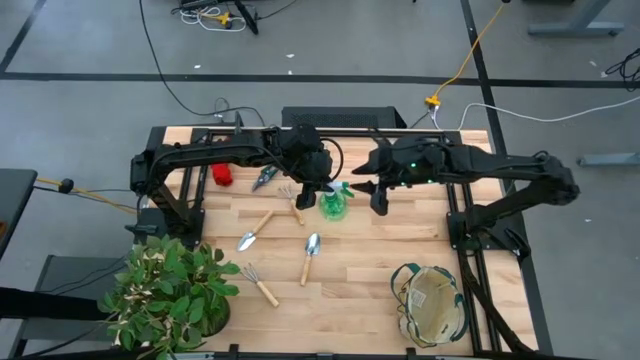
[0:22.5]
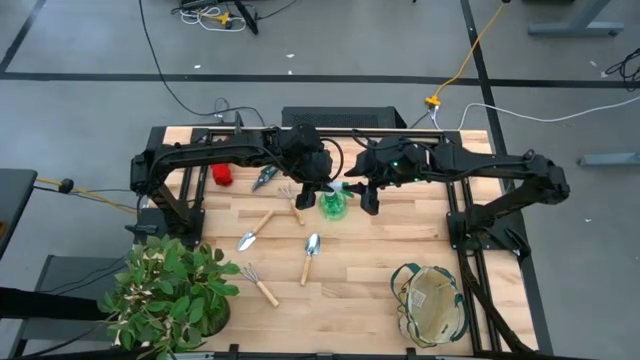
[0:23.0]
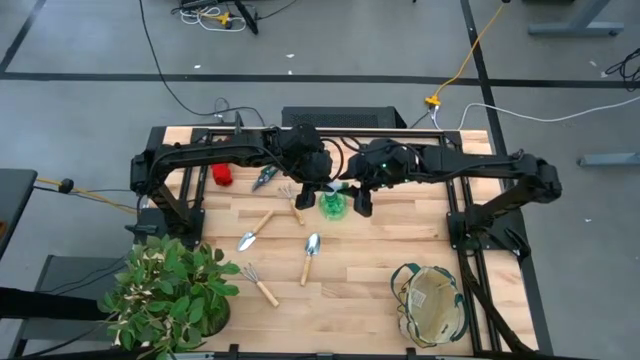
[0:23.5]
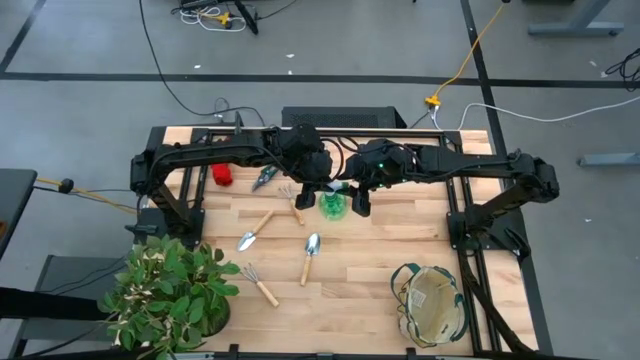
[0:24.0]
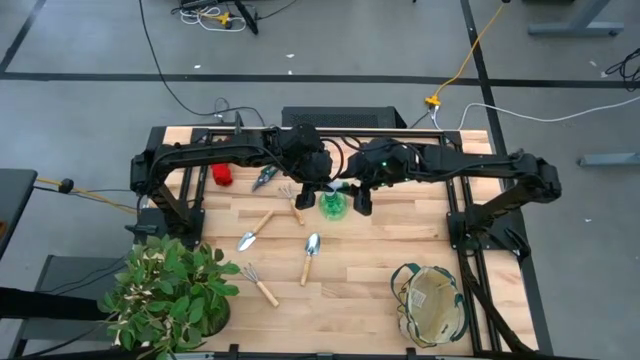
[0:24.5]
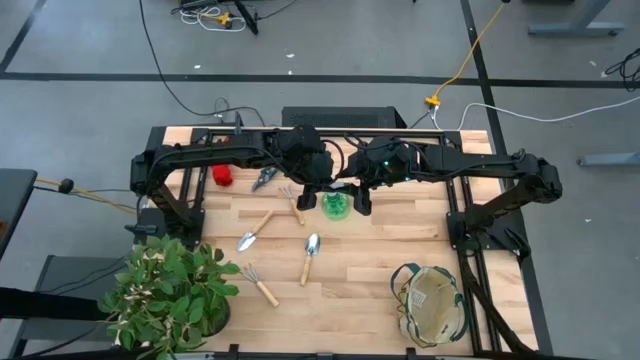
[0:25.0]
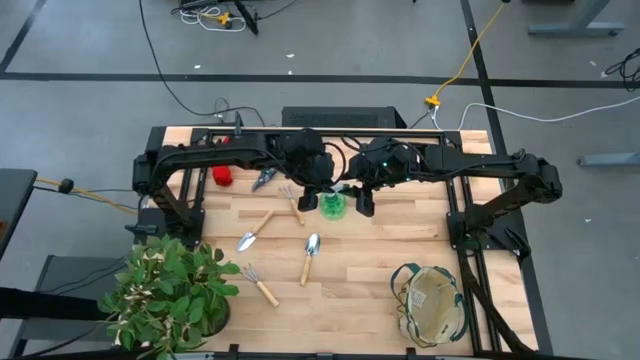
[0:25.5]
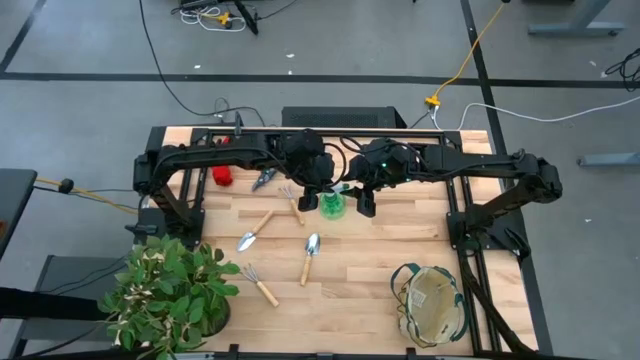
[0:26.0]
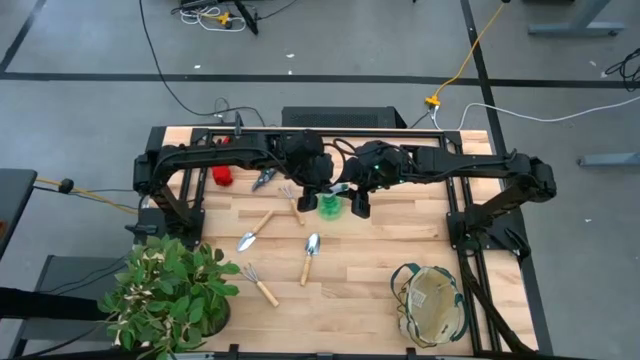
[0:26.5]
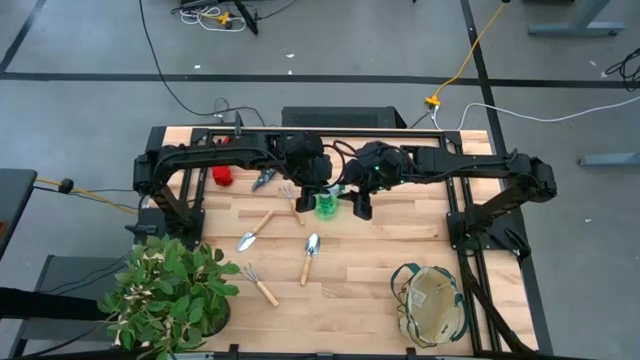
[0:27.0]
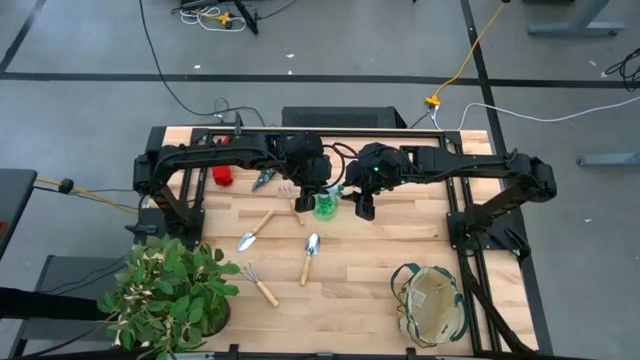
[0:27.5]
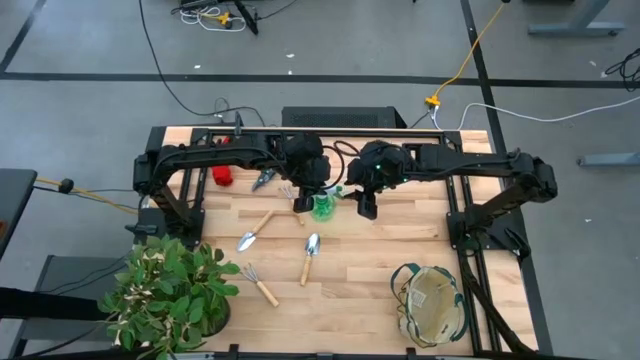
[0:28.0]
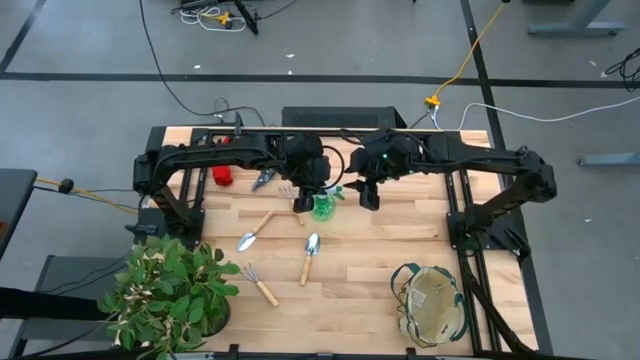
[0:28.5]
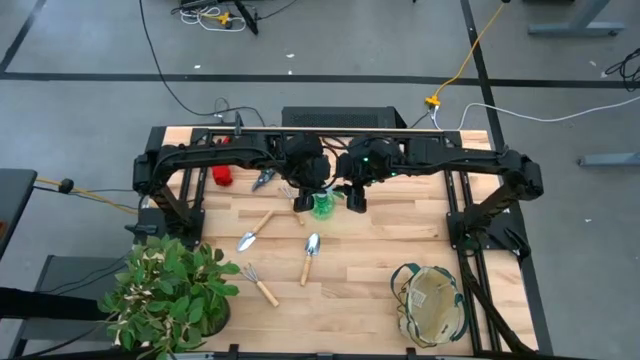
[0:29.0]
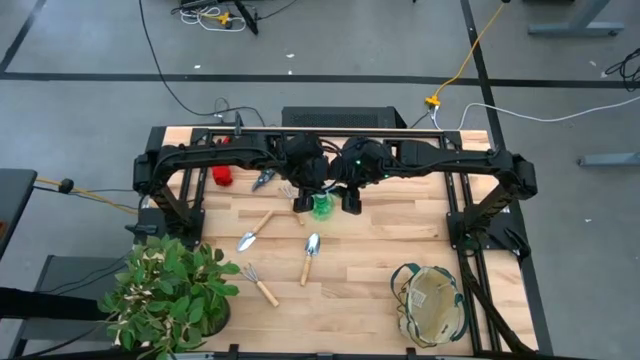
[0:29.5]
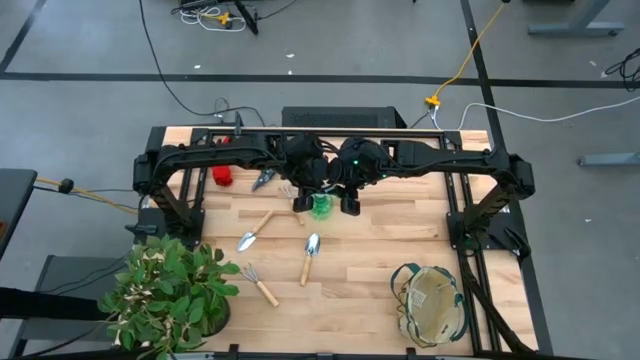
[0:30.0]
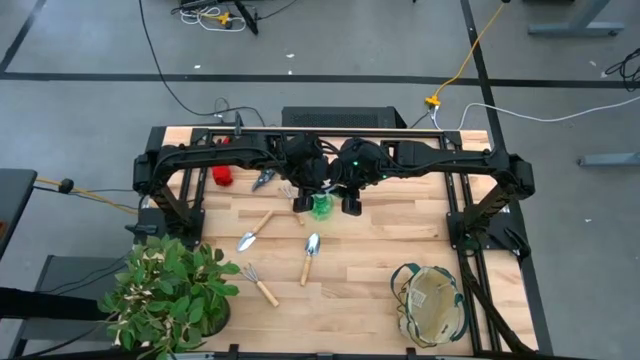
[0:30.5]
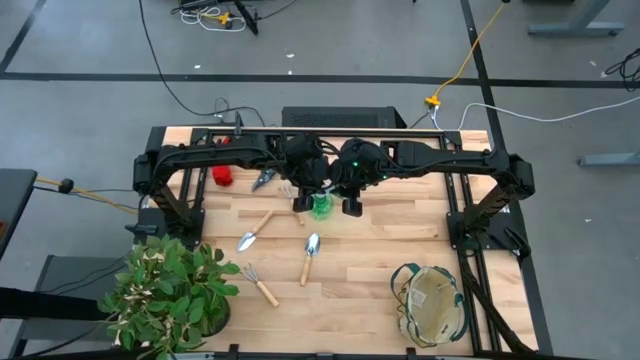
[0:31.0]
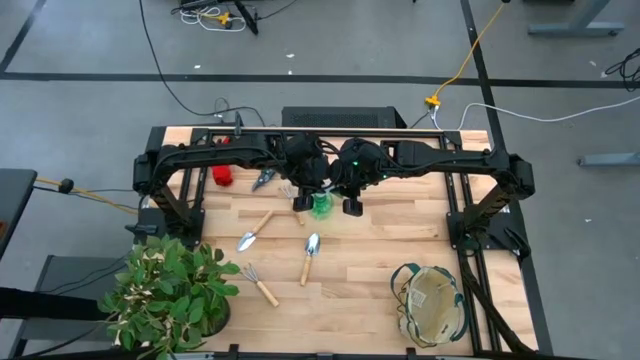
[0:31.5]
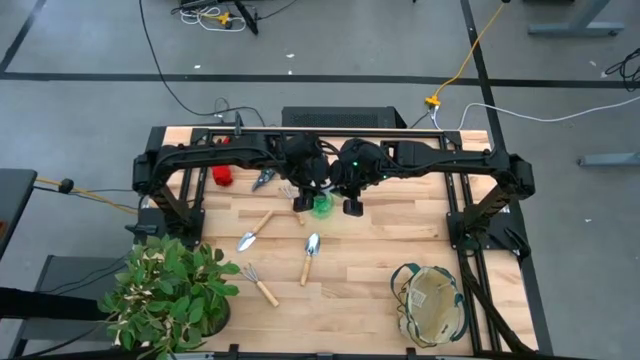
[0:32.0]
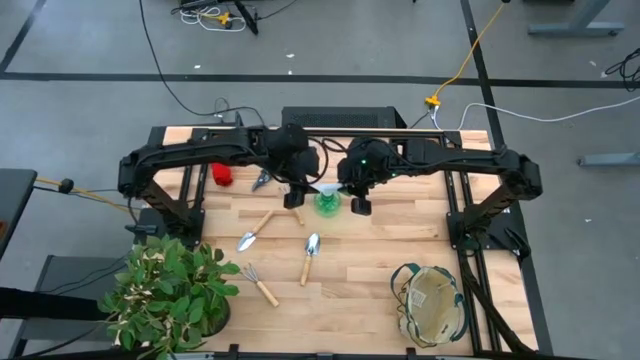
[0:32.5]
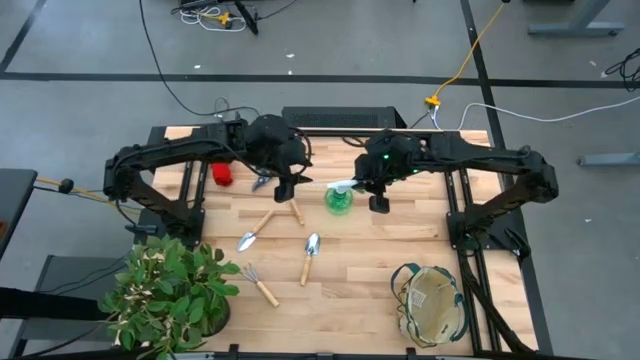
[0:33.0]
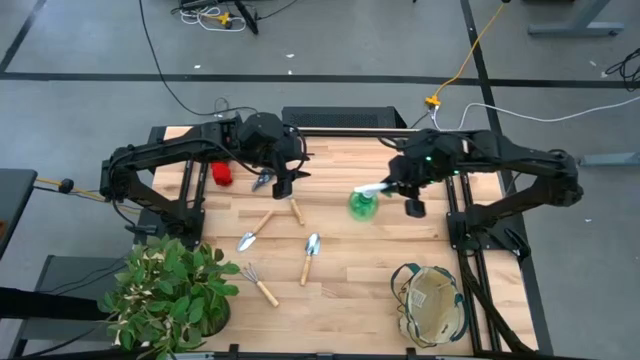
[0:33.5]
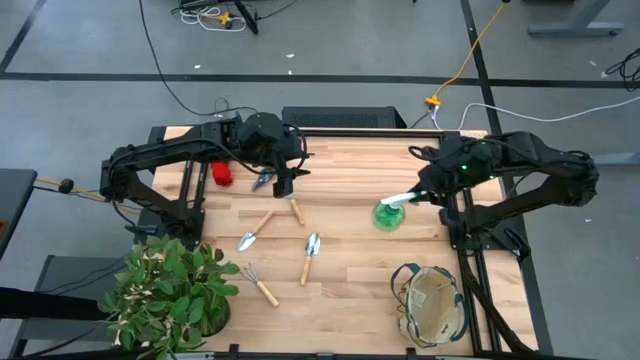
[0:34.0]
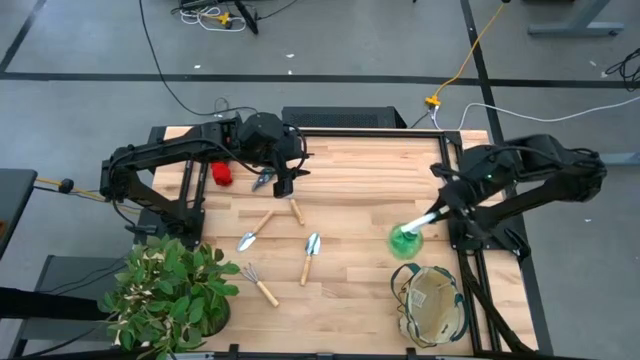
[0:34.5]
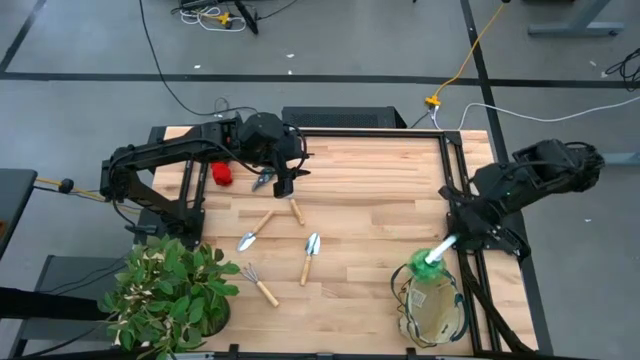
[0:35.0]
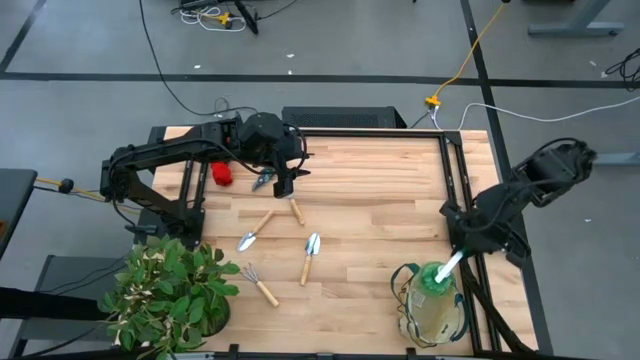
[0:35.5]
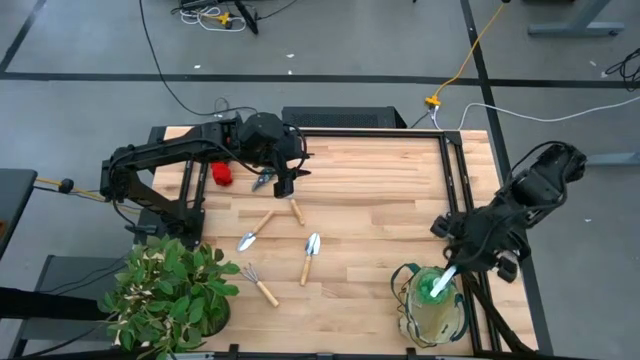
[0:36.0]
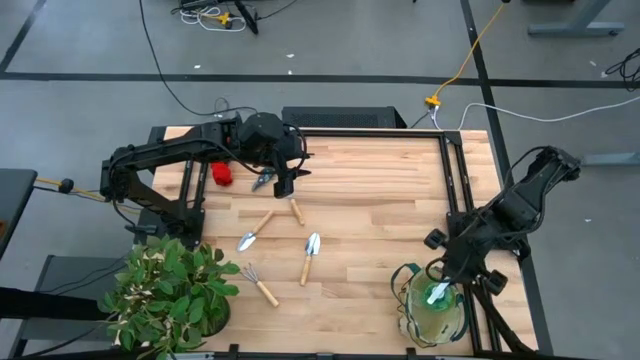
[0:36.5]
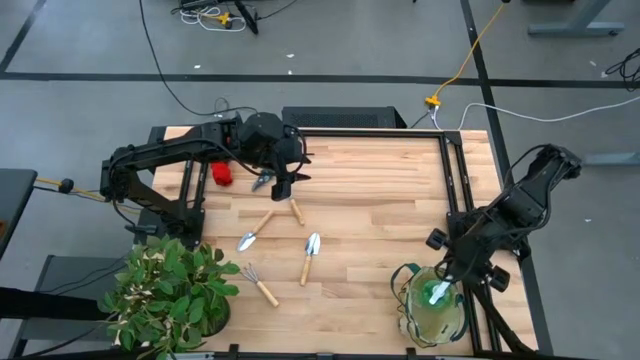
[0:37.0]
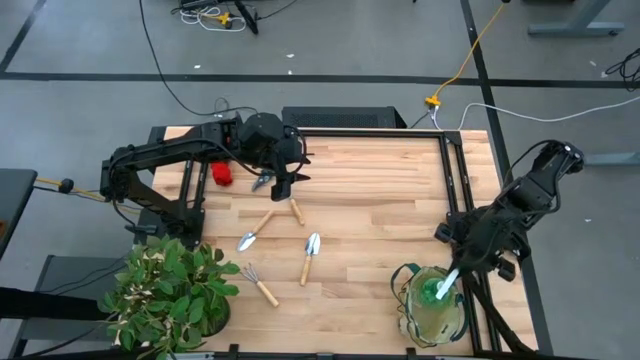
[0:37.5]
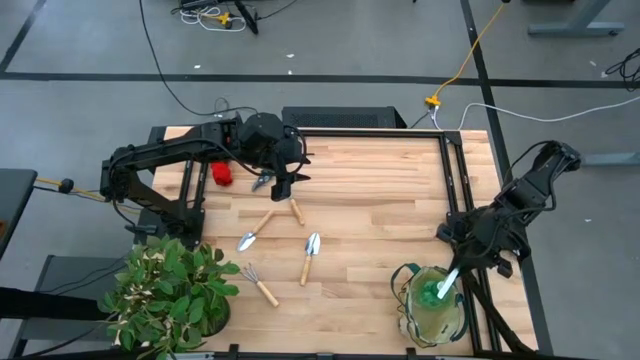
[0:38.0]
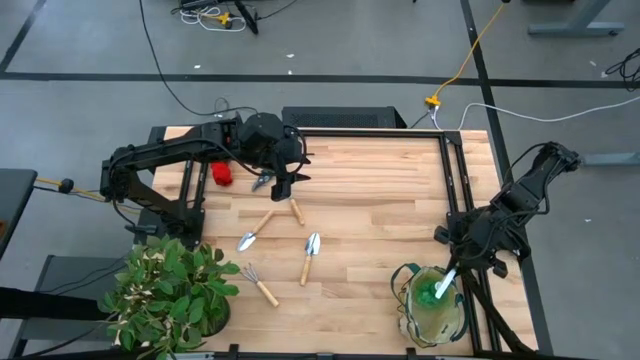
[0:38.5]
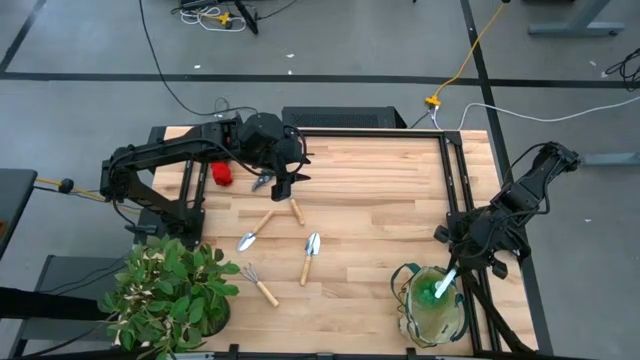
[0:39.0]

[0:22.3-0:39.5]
Task: Pick & Place Garden tools in Gardening bag
Put the green spray bottle into the white gardening bag

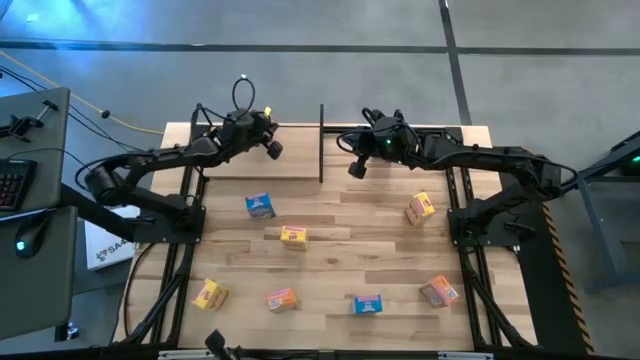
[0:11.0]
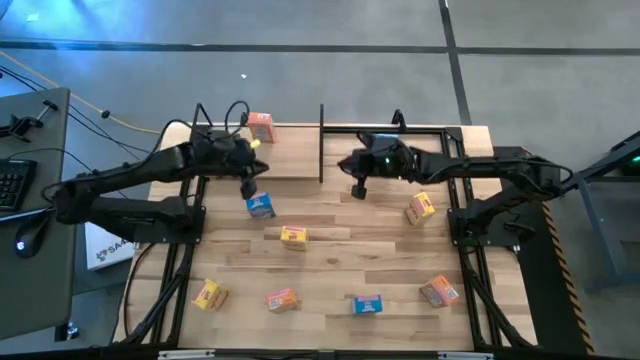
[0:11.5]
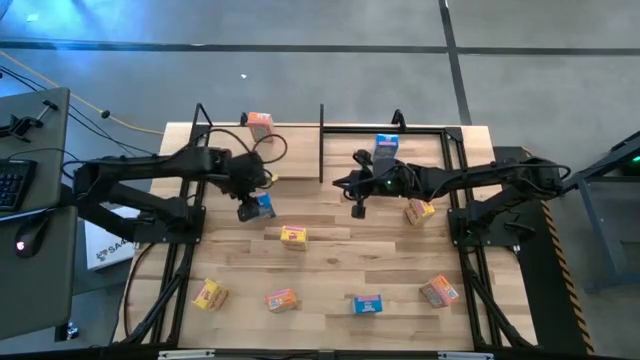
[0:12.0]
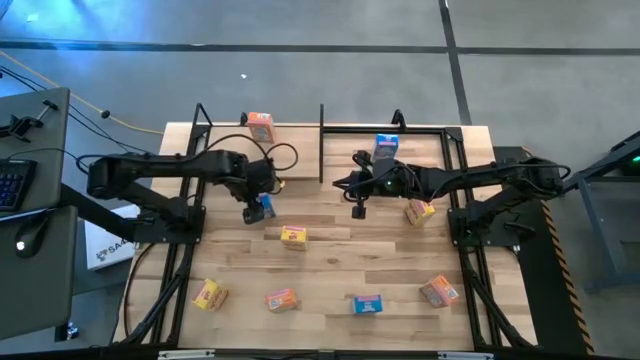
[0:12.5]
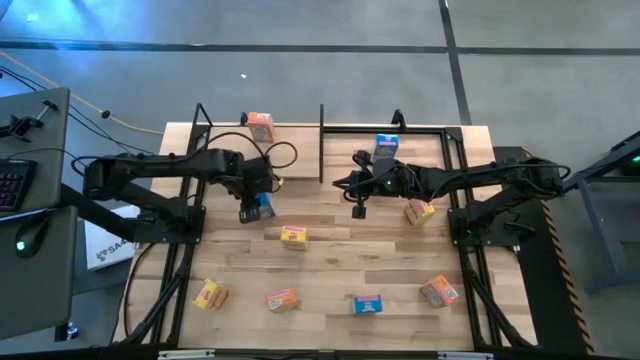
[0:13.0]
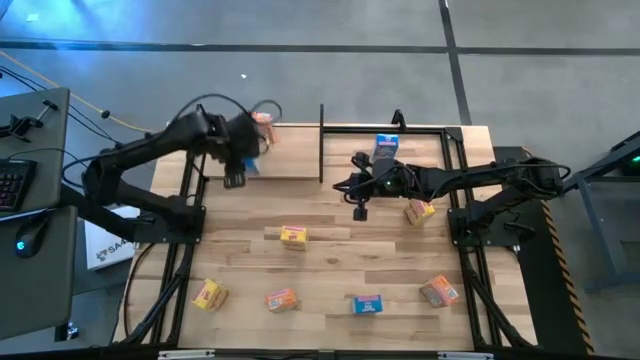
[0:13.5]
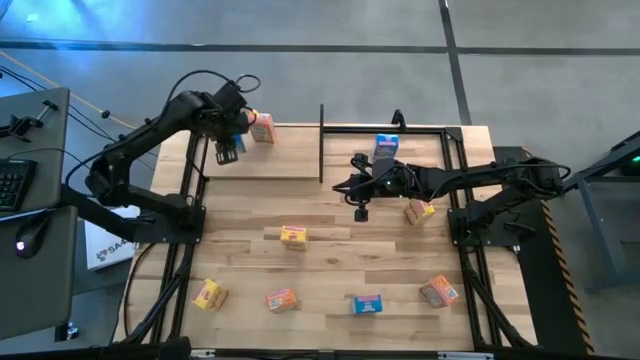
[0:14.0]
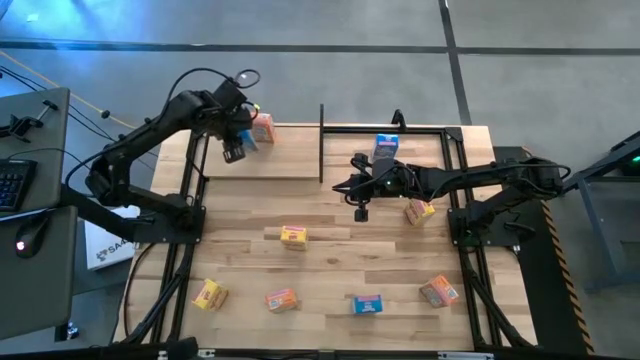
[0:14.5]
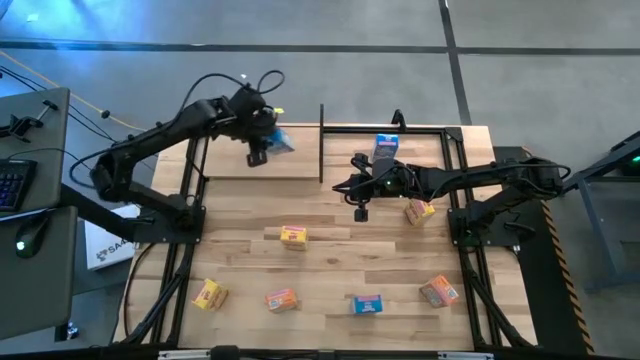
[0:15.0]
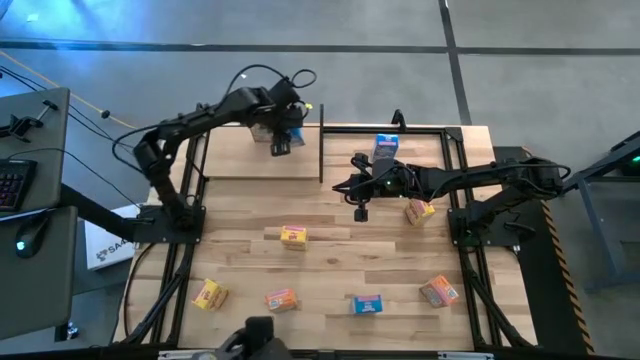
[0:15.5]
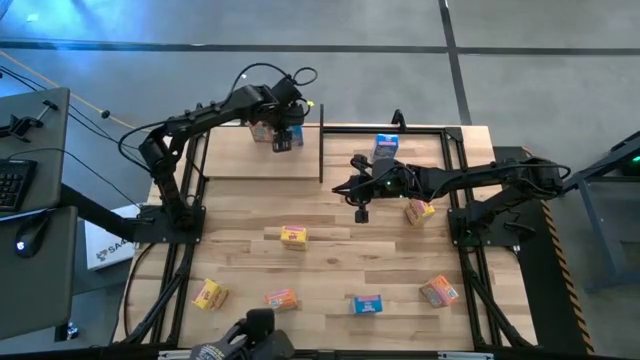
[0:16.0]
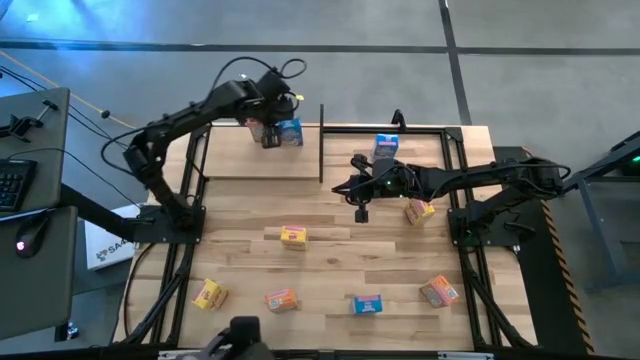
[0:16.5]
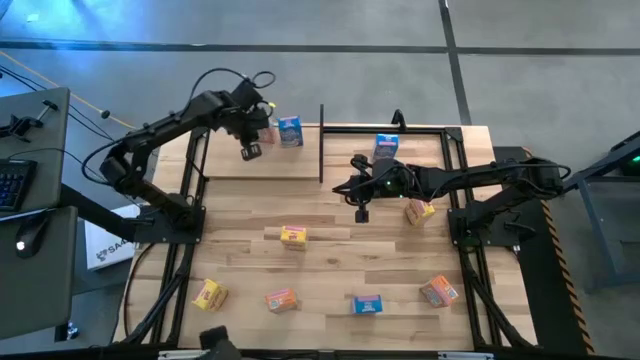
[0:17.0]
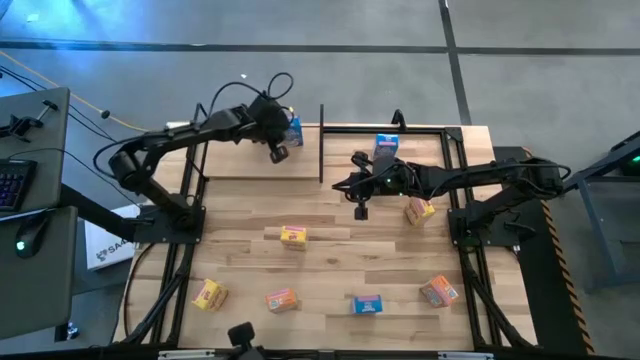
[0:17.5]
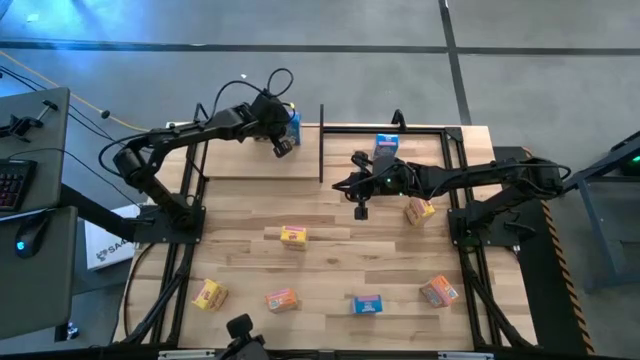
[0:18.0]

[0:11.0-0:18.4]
Task: Stack cereal on shelf
Put the middle left blue cereal box on the shelf
